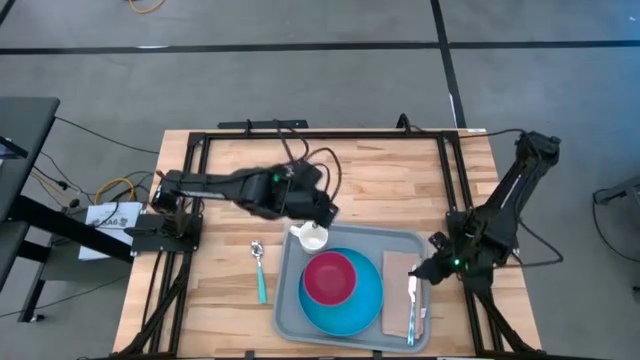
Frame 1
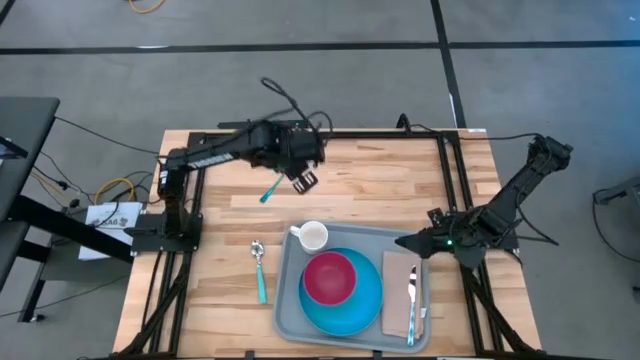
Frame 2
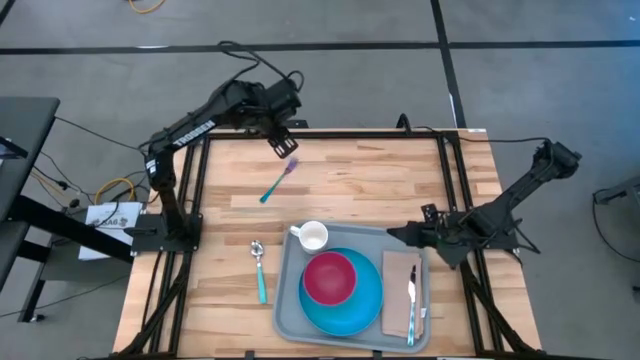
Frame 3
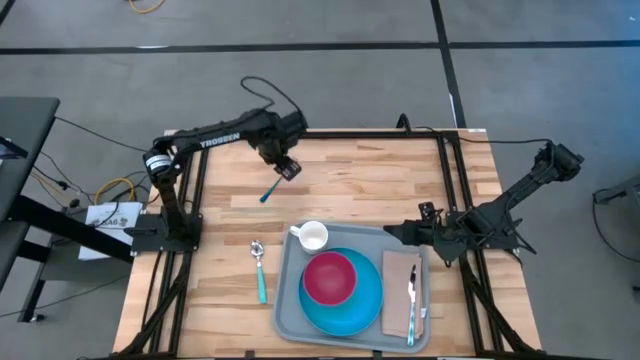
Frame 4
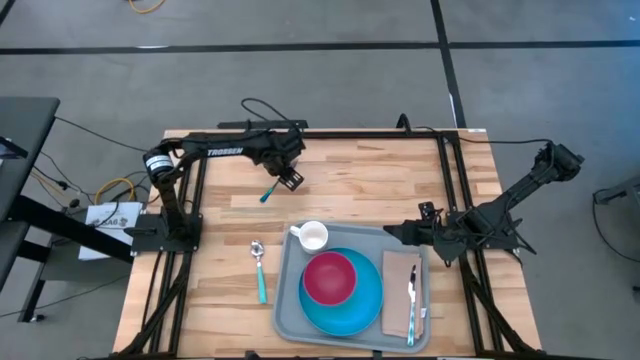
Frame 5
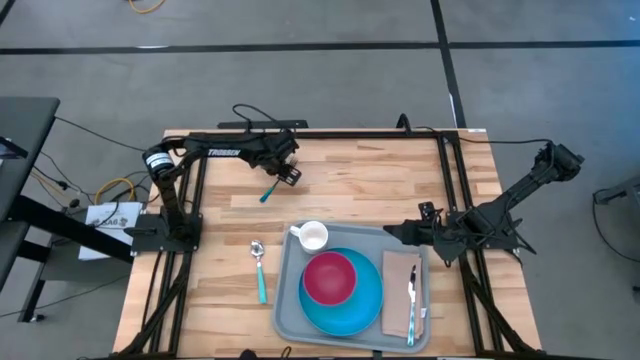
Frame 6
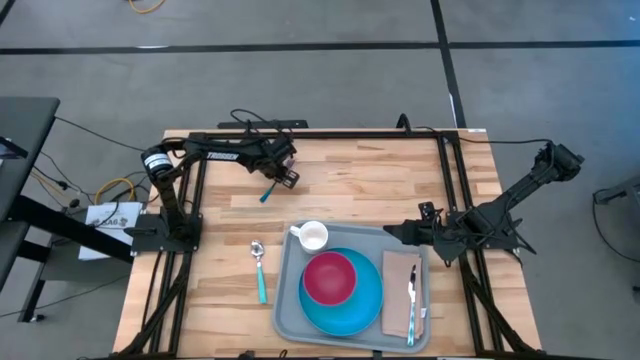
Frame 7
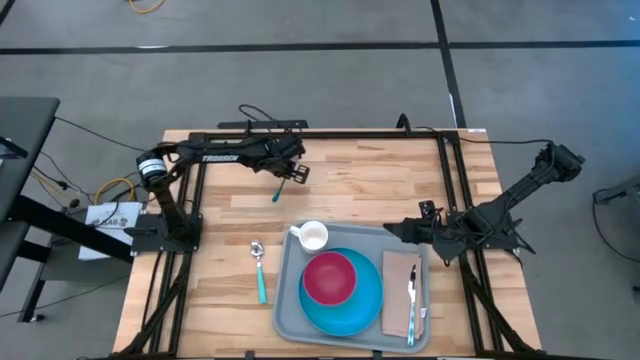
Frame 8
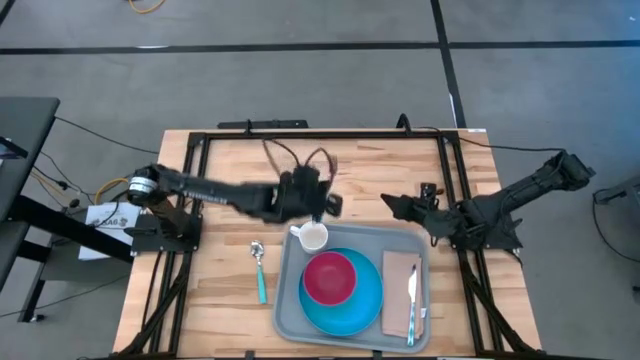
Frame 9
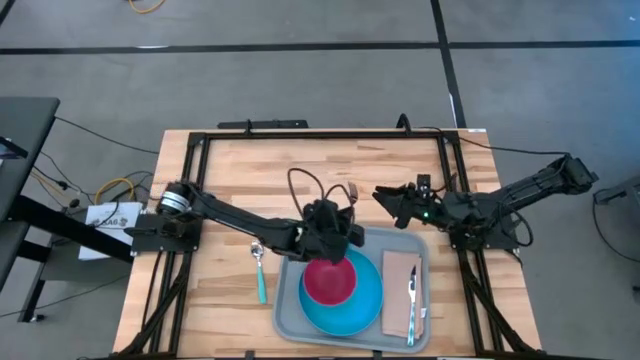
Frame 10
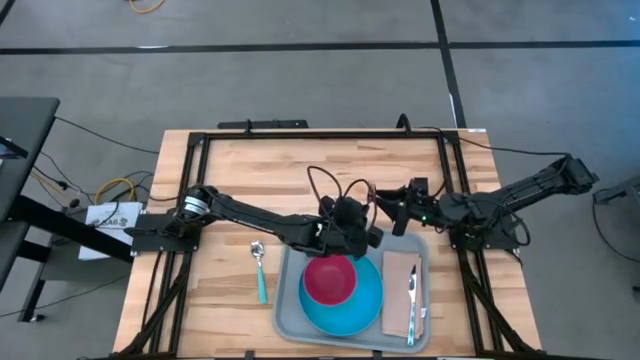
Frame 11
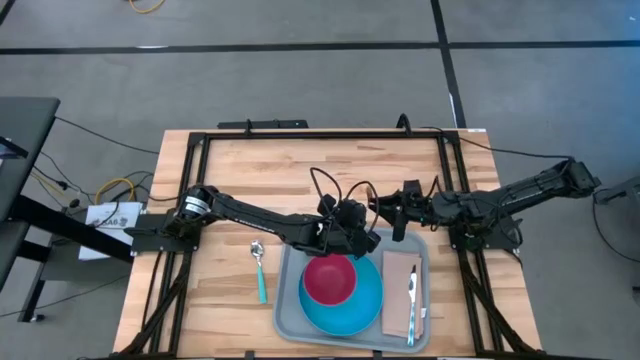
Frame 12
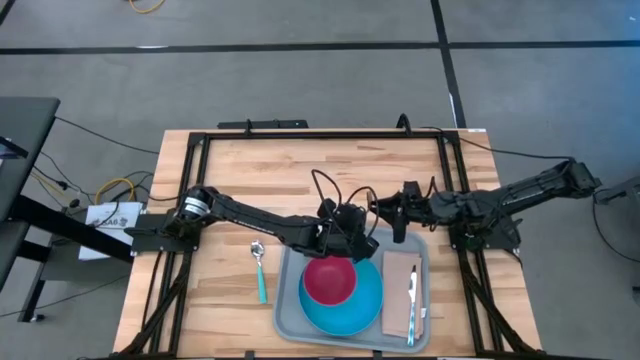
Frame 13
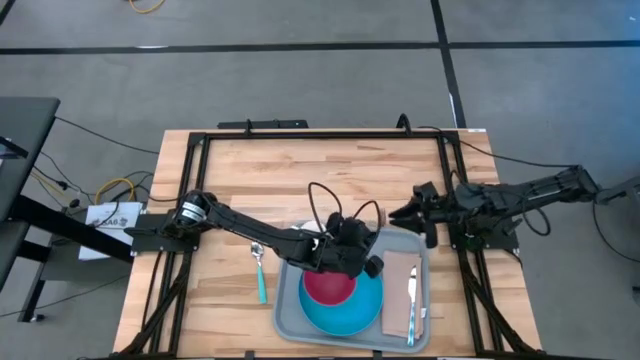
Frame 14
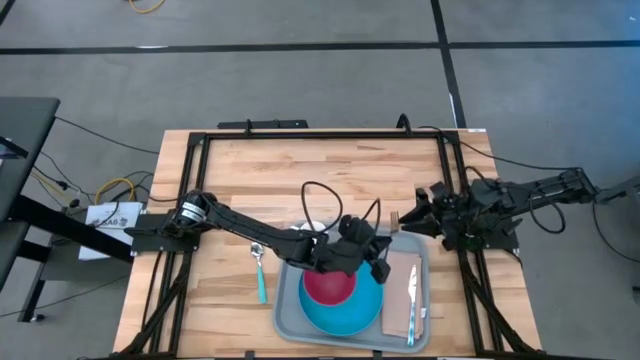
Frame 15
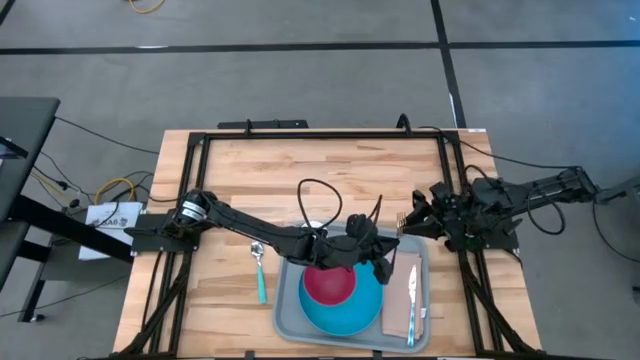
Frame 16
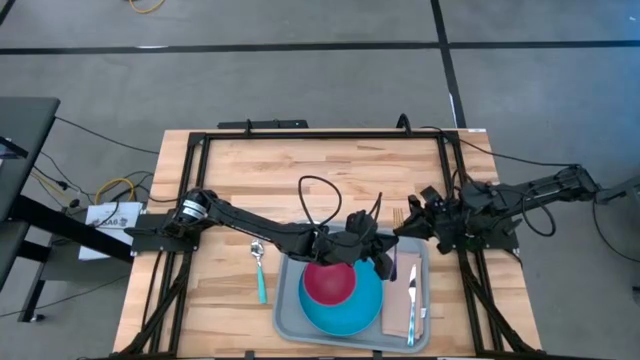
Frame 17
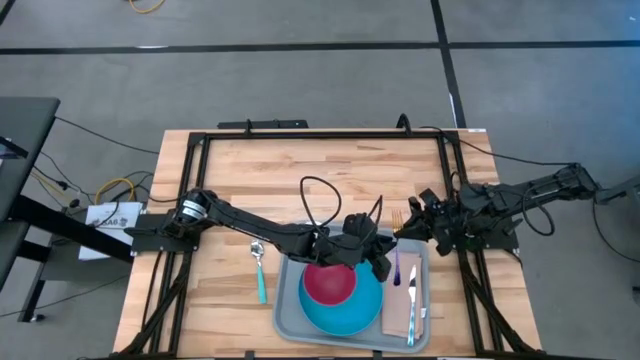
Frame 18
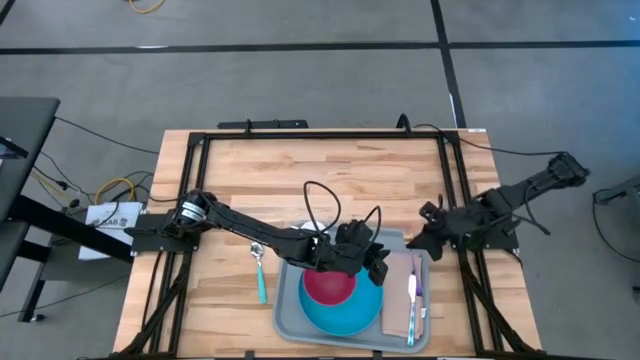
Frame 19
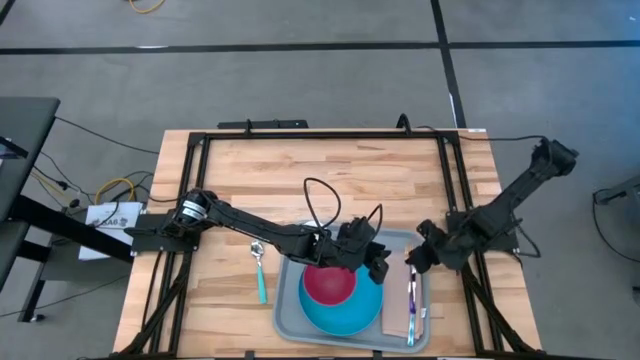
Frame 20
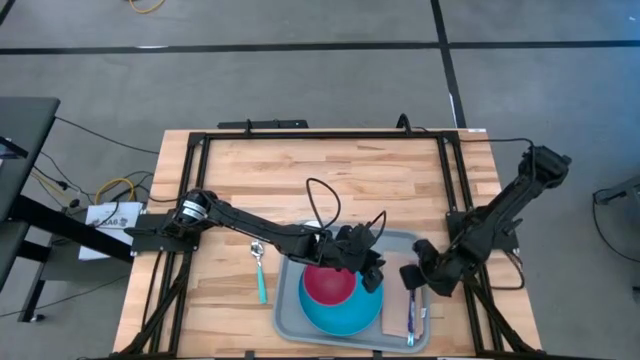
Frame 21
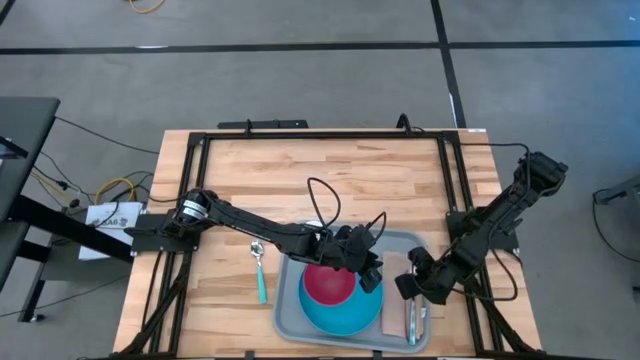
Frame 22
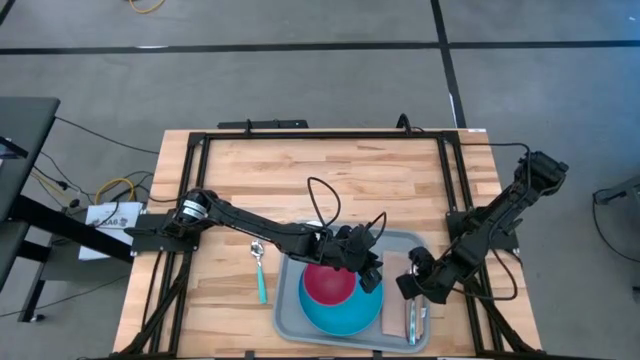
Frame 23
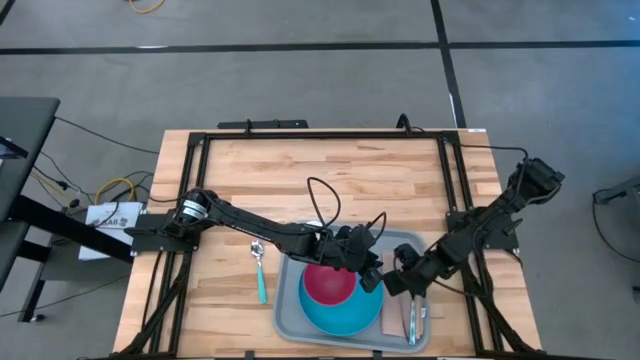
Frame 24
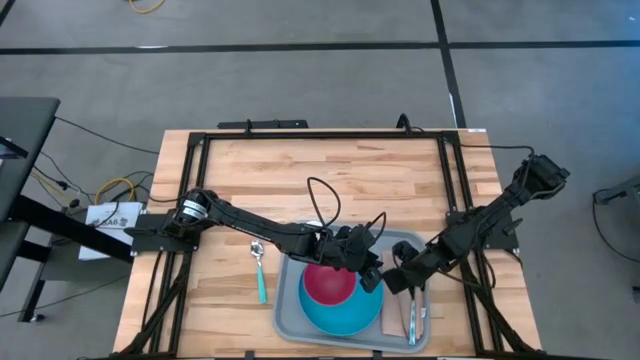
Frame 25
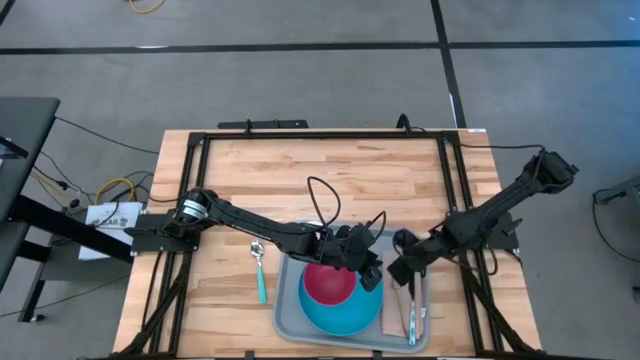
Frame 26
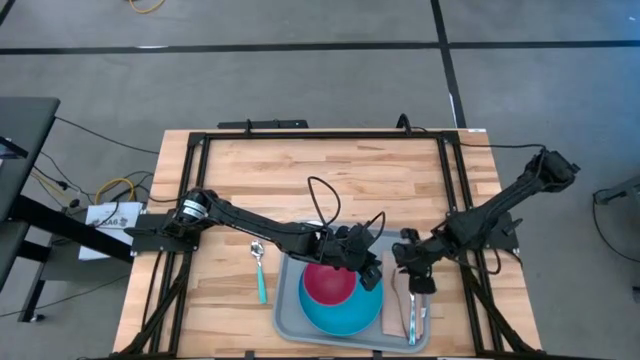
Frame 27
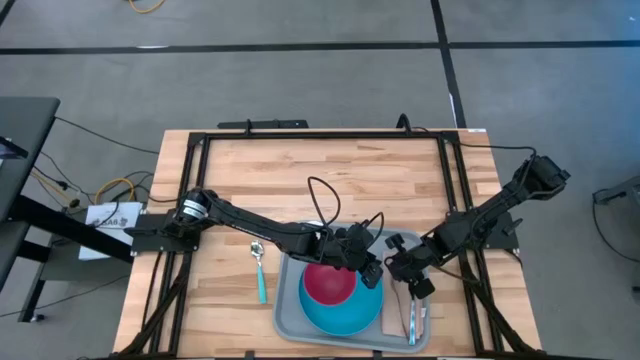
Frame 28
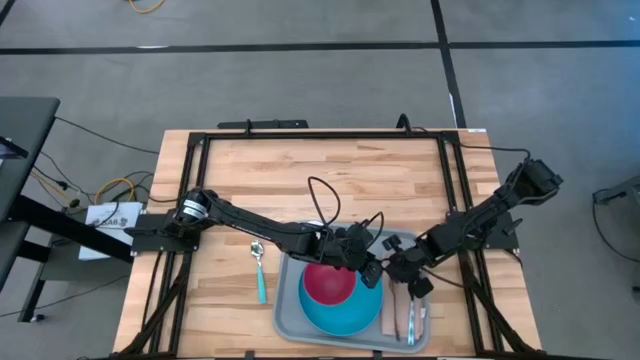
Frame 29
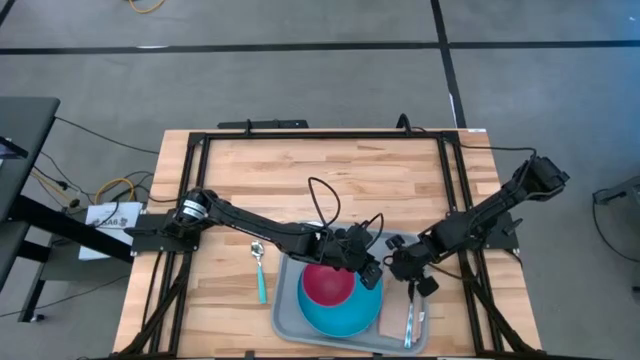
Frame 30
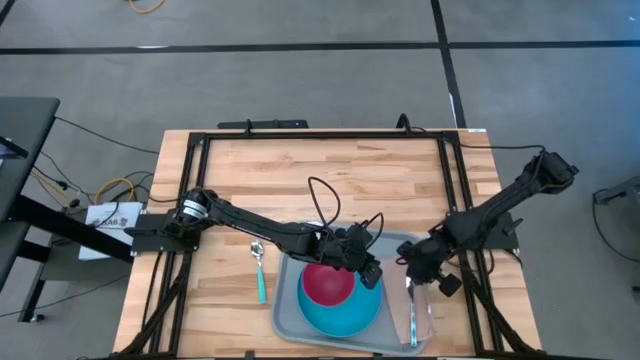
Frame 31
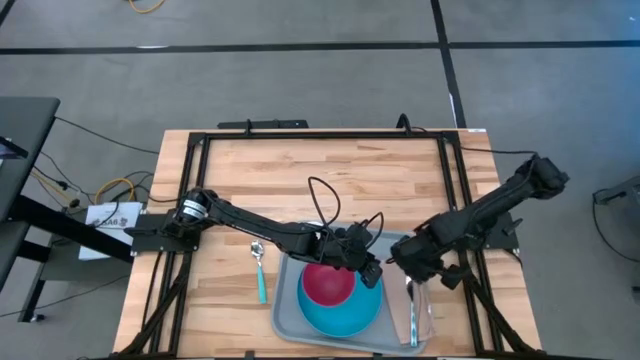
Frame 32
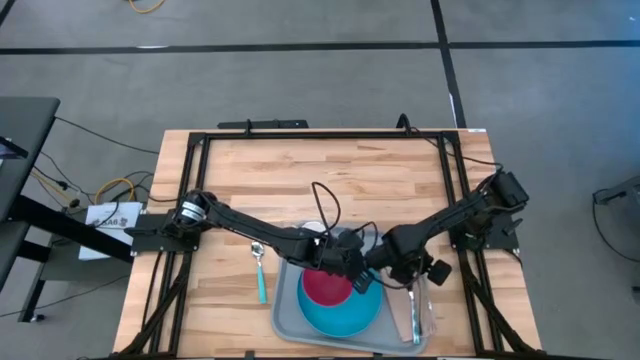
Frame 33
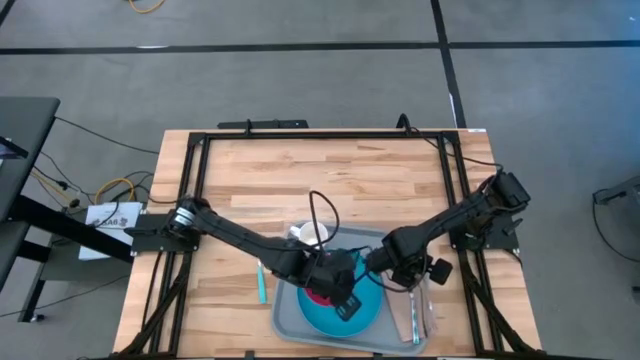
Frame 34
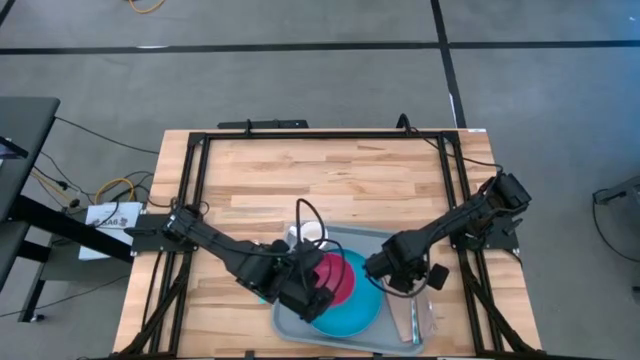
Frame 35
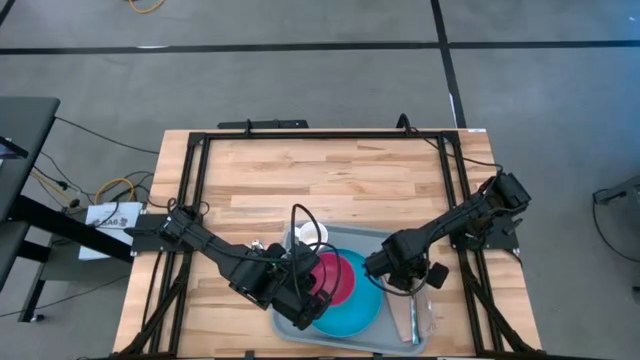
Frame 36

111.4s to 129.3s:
Task: Set up tray
Put the iridescent fork beside the blue knife on the brown napkin

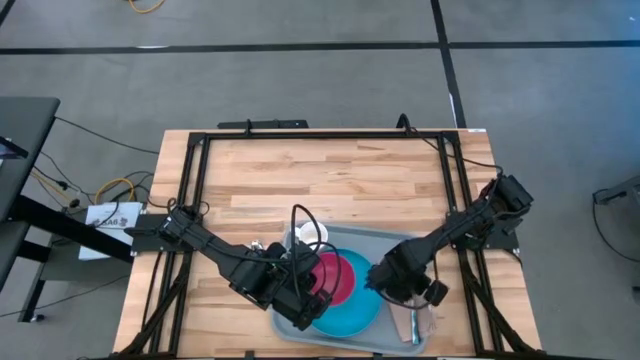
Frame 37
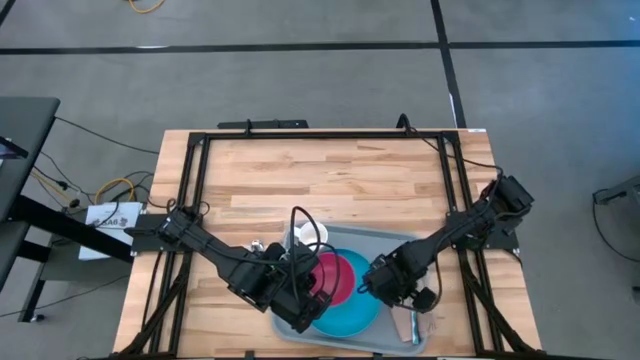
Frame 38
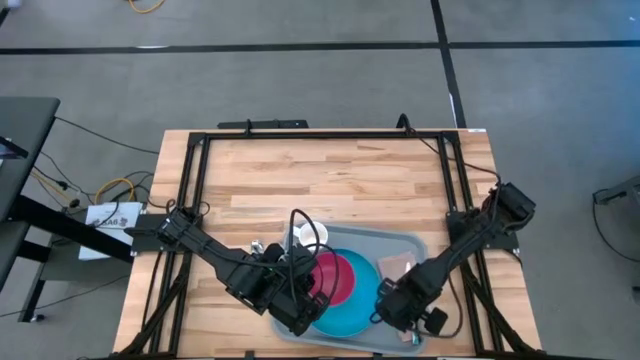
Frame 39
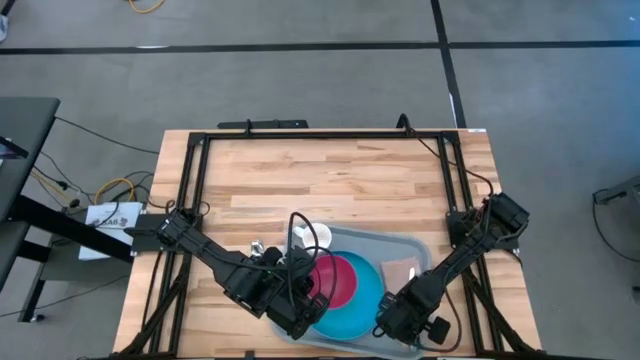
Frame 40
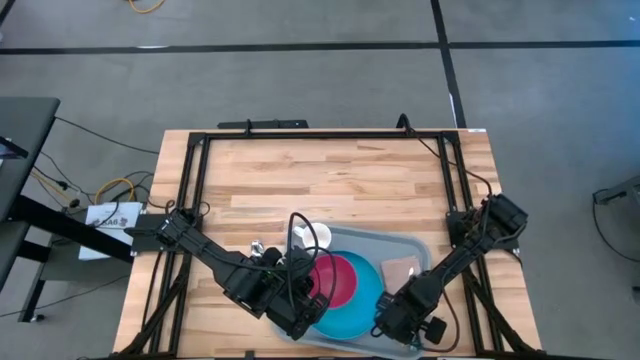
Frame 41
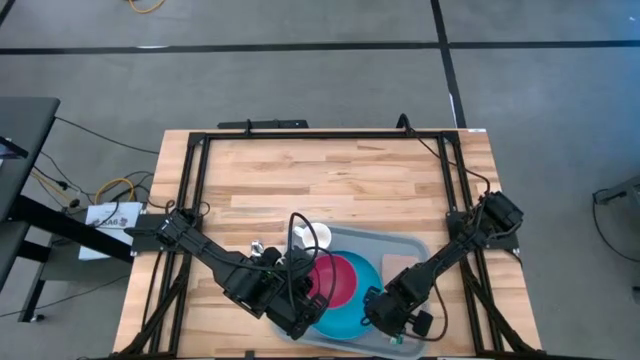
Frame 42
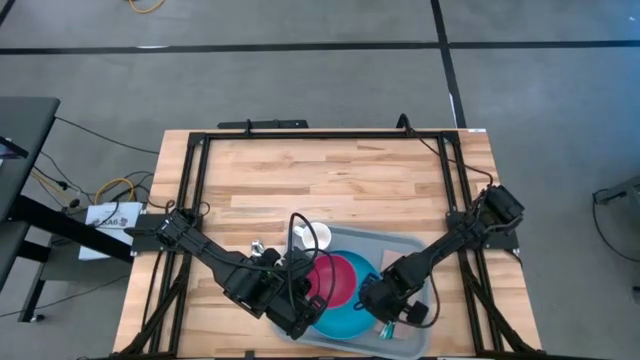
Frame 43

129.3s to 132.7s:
Adjust the brown napkin

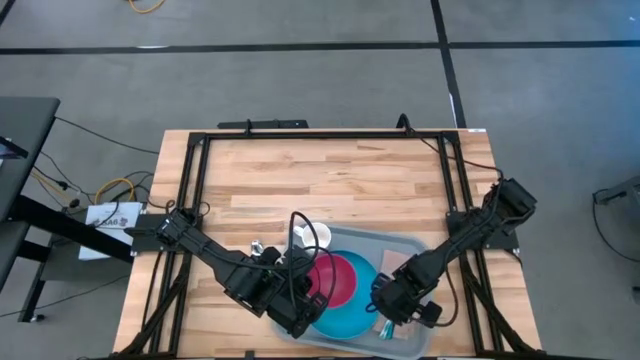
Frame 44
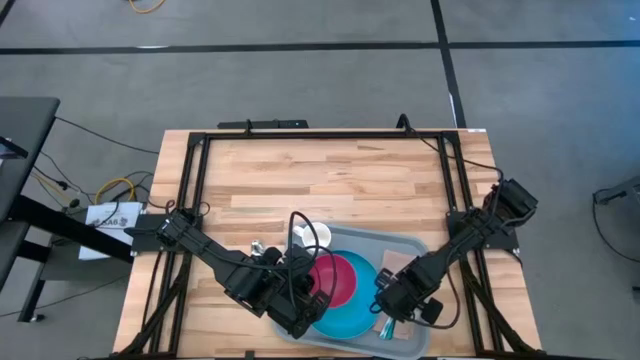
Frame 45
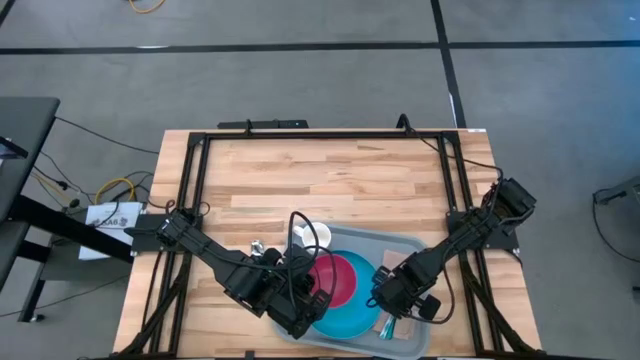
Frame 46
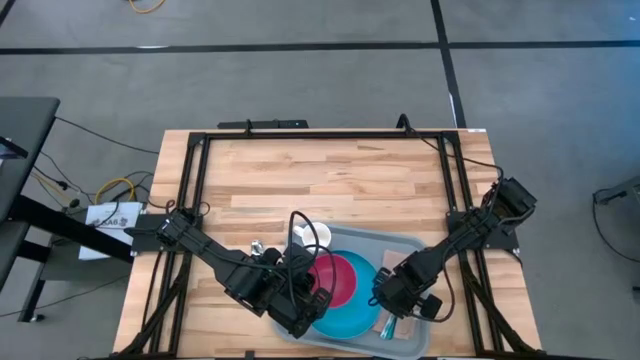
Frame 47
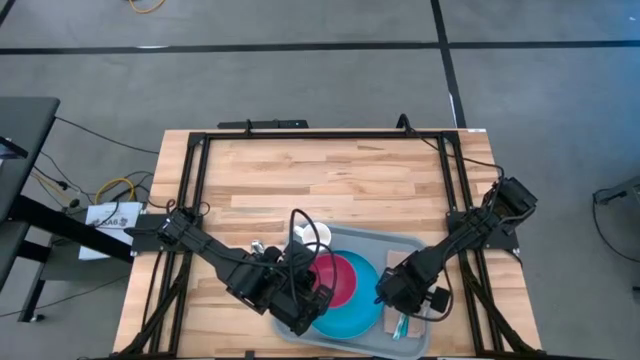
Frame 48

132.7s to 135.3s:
Adjust the iridescent fork
